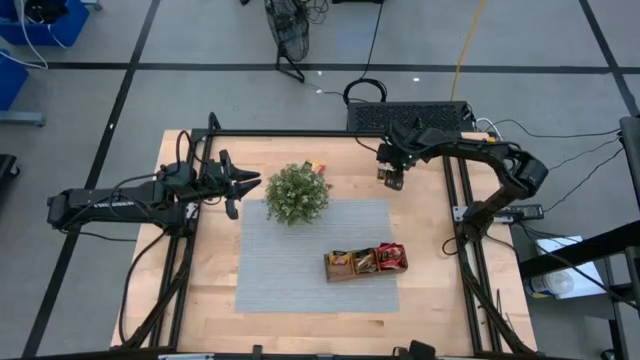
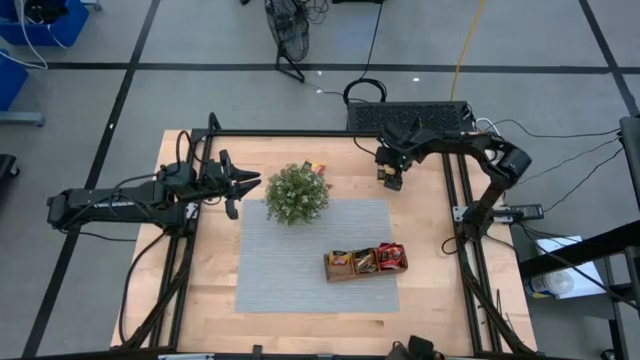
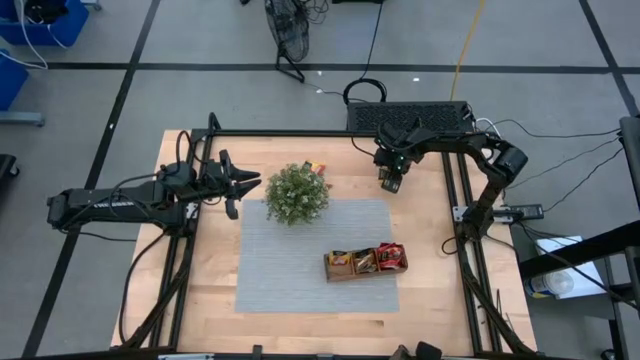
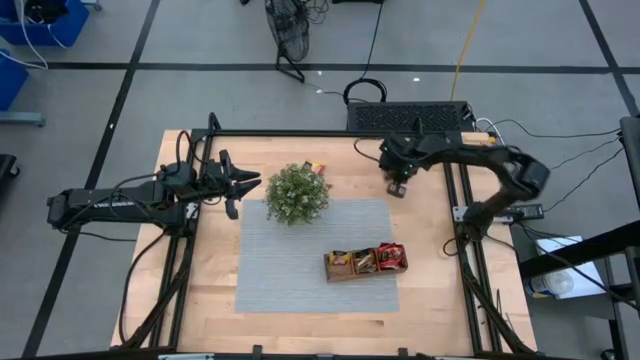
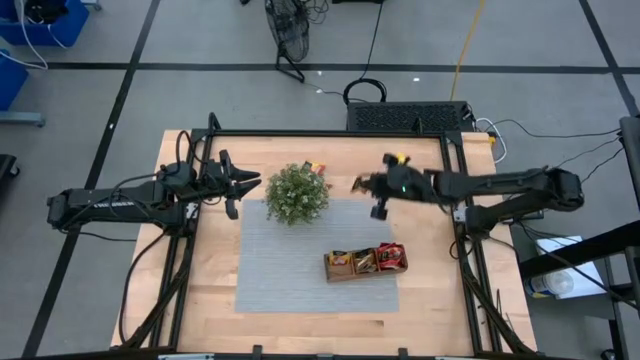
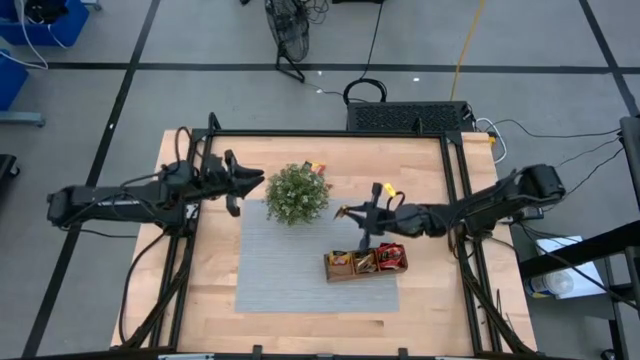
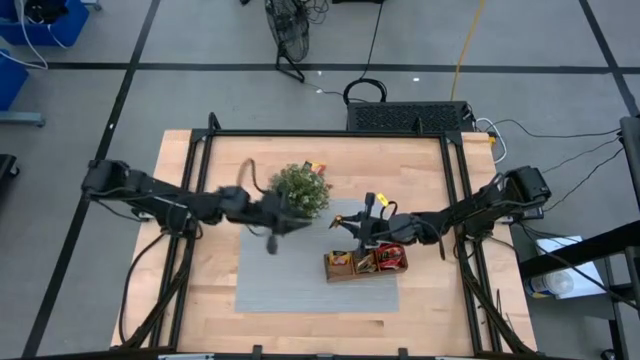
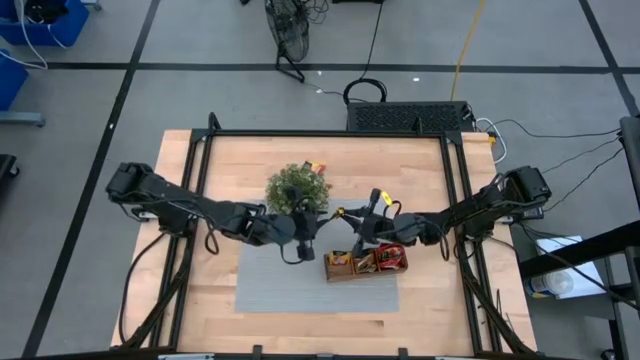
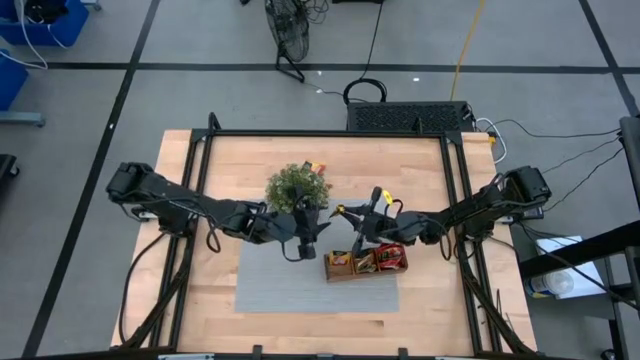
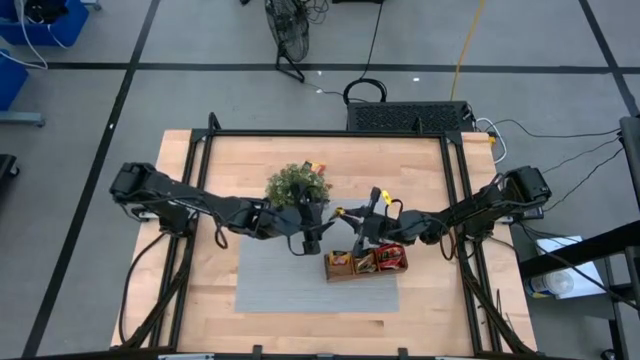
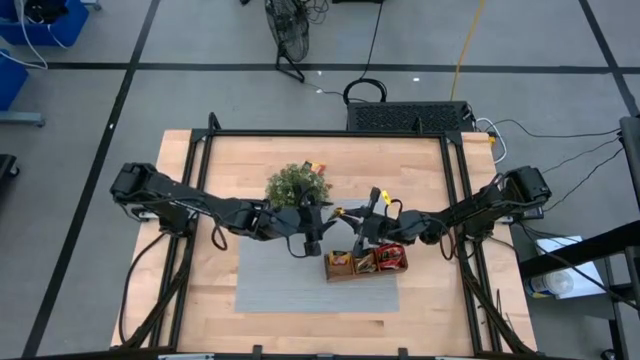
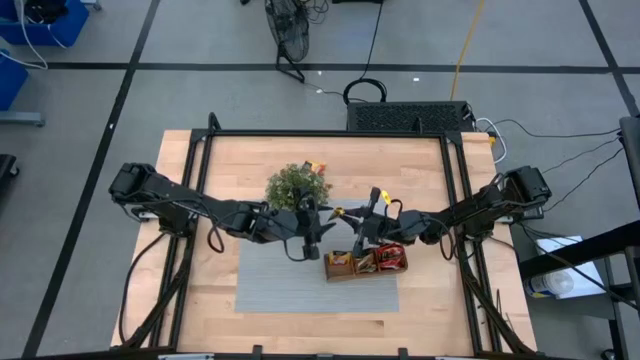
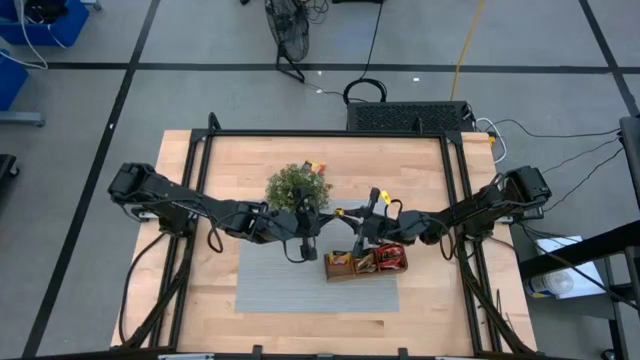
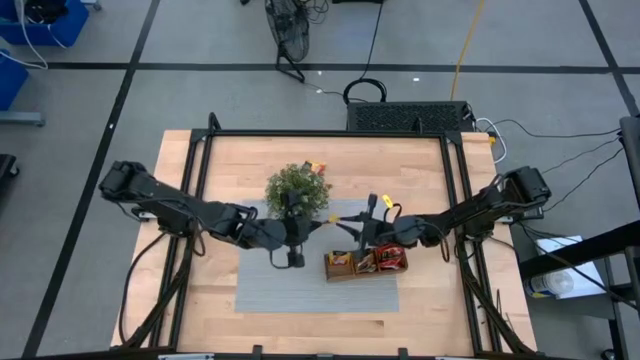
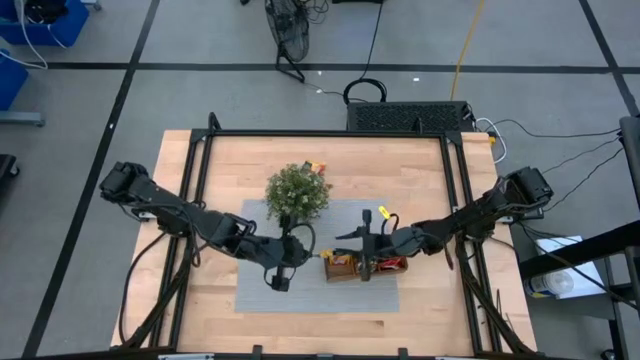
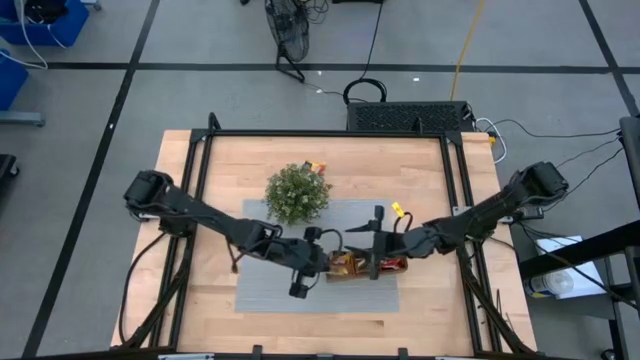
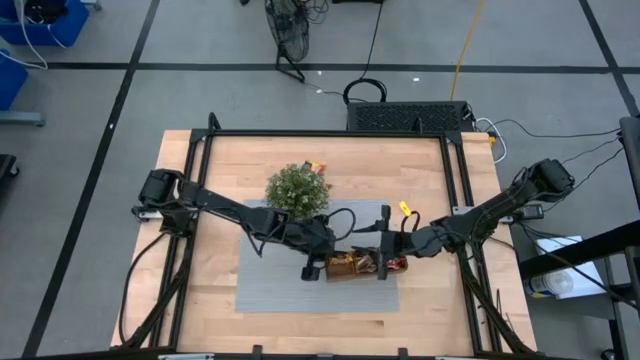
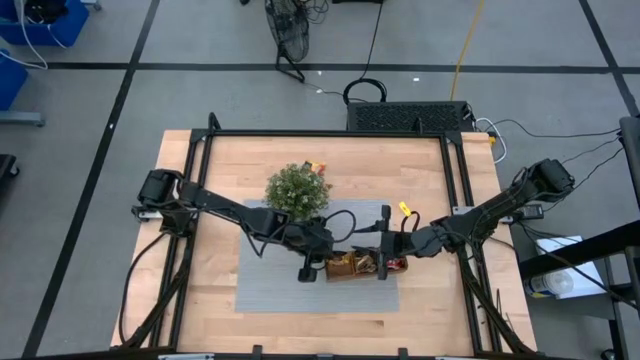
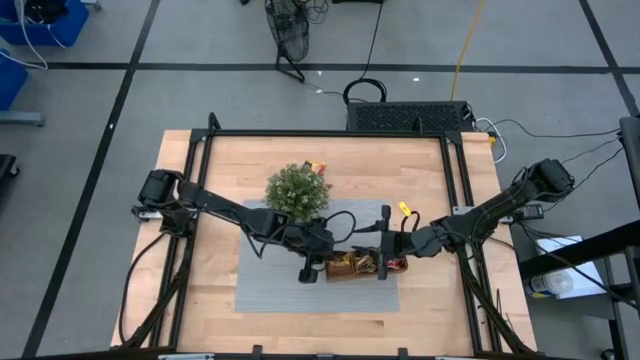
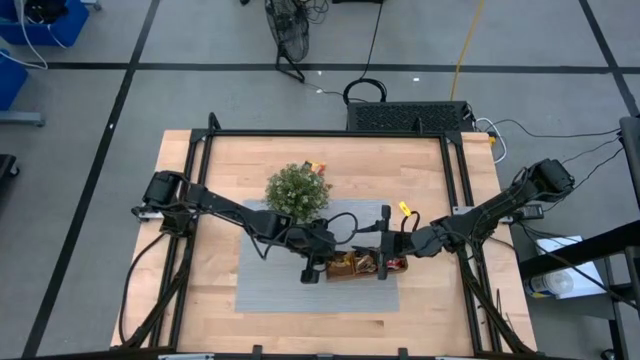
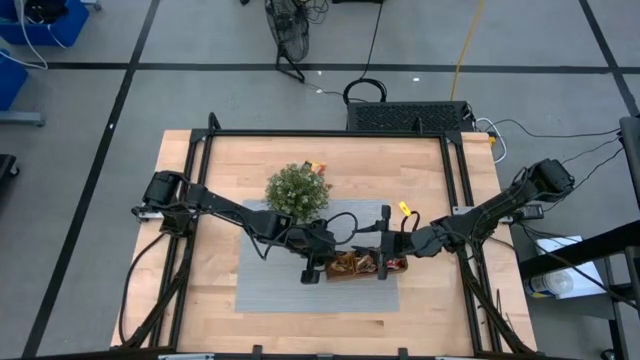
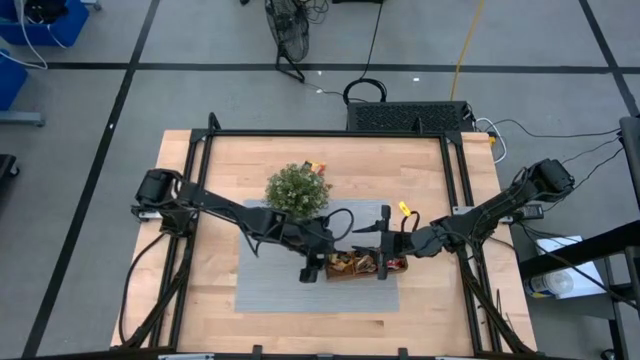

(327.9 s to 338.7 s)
Task: Pick & Place Tea
Put the mango tea sachet into the brown organizer

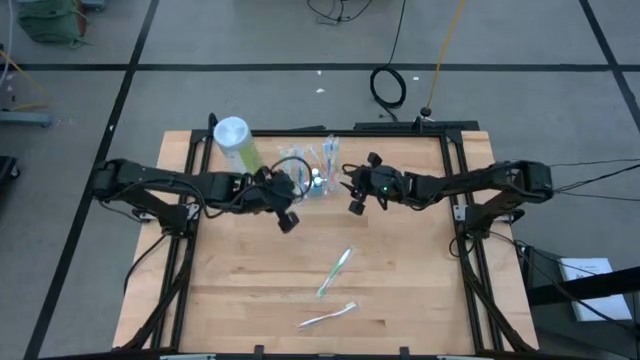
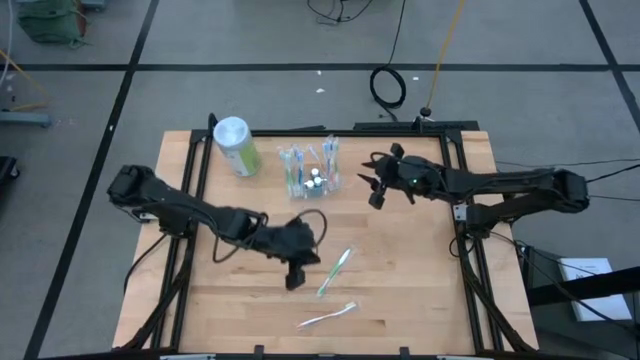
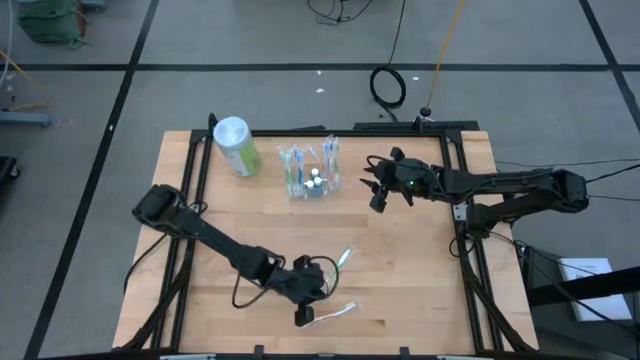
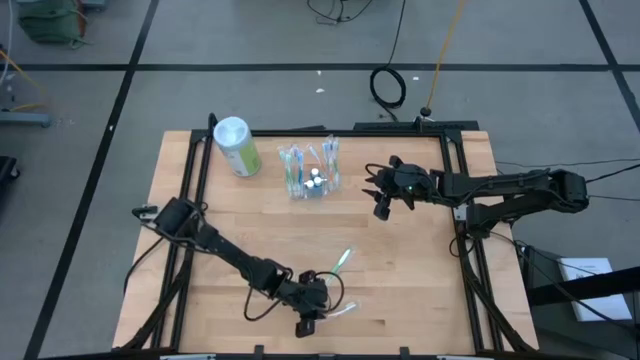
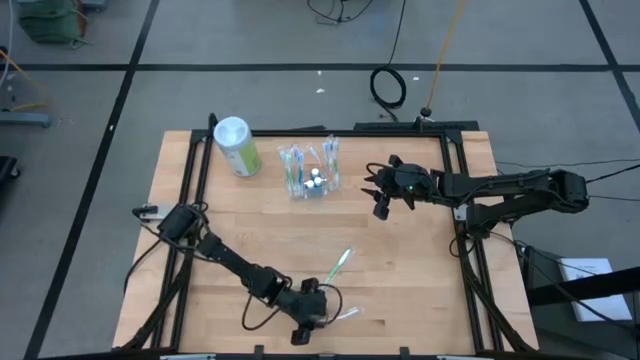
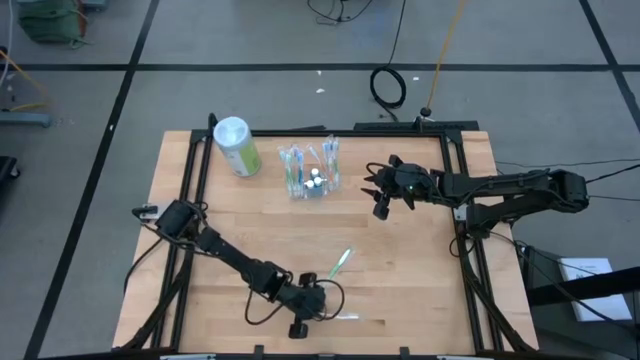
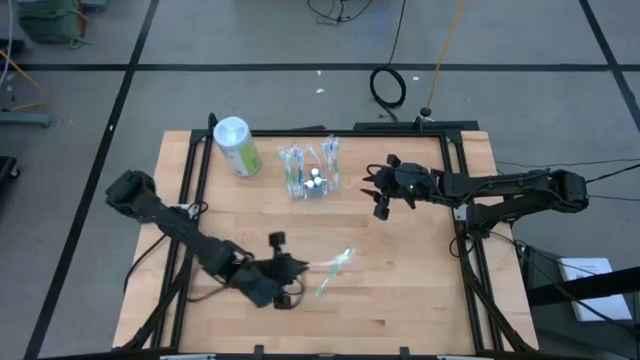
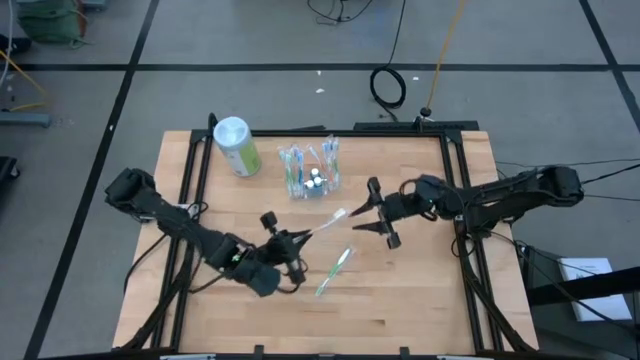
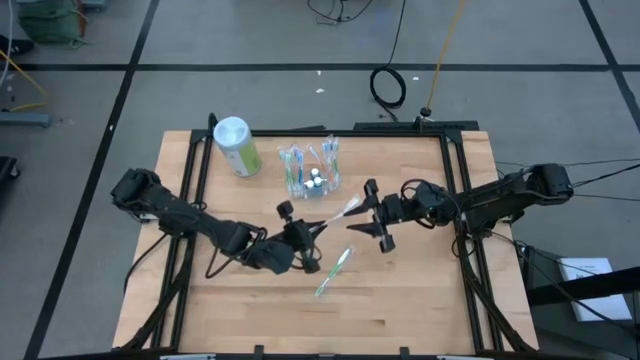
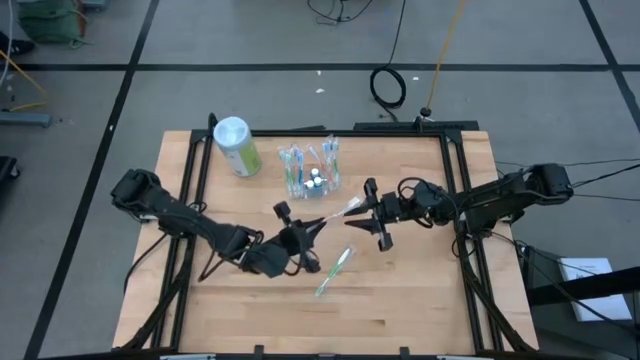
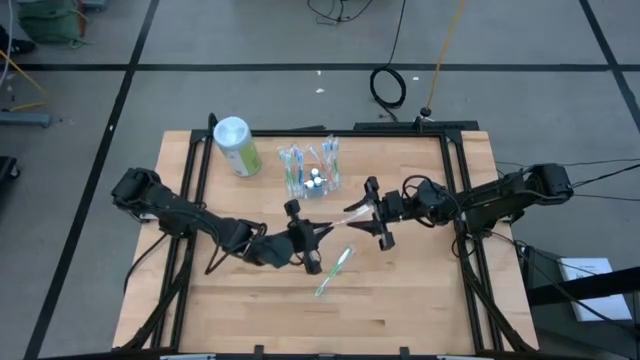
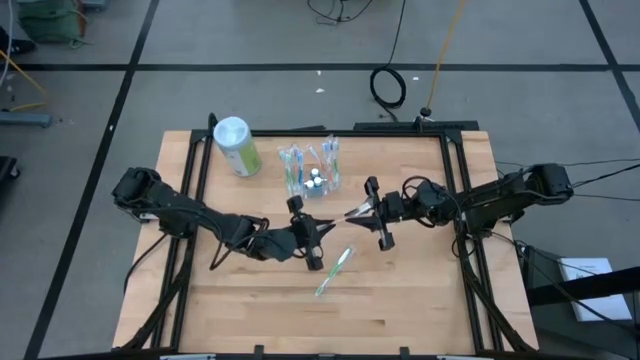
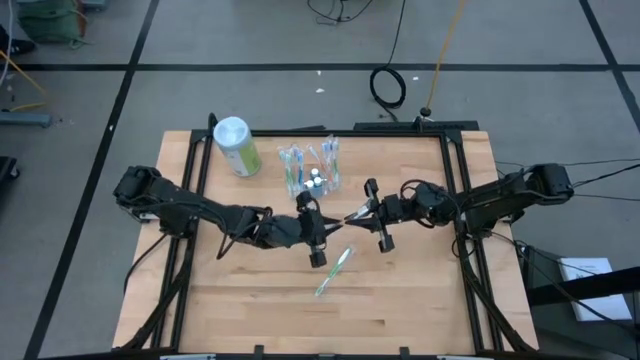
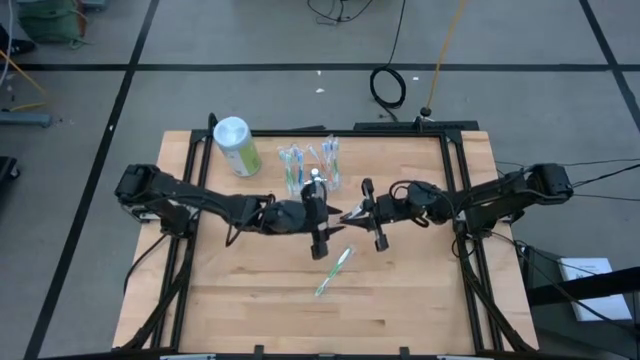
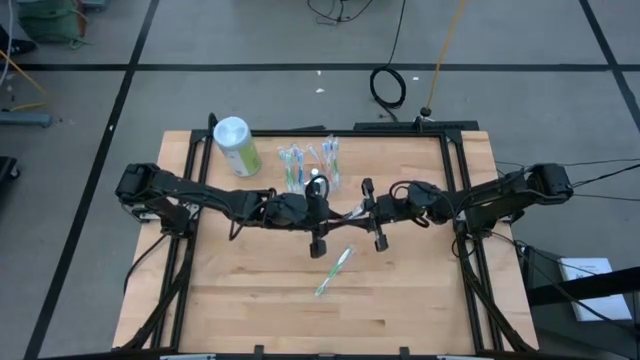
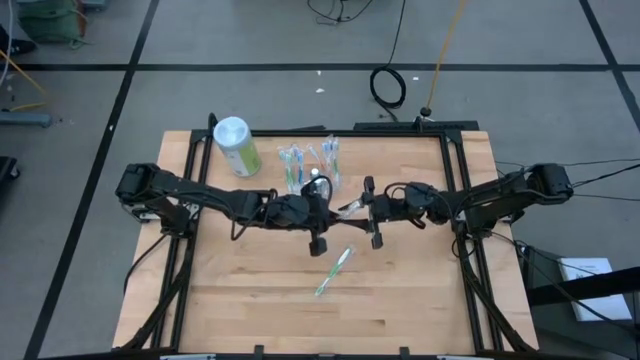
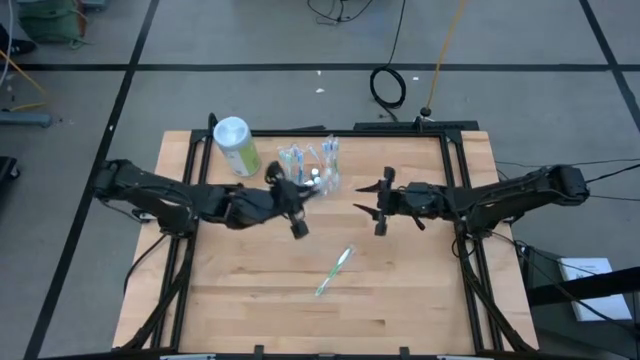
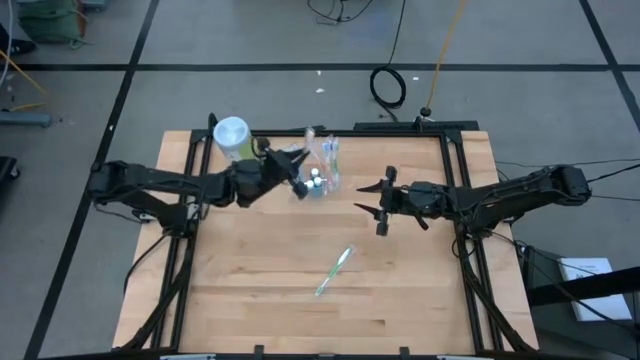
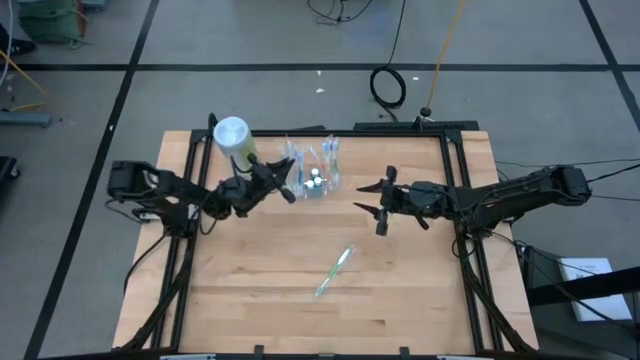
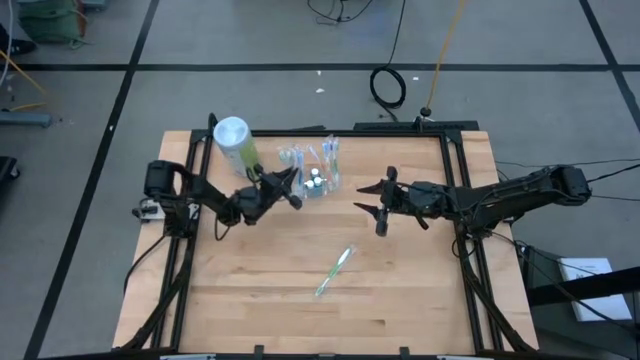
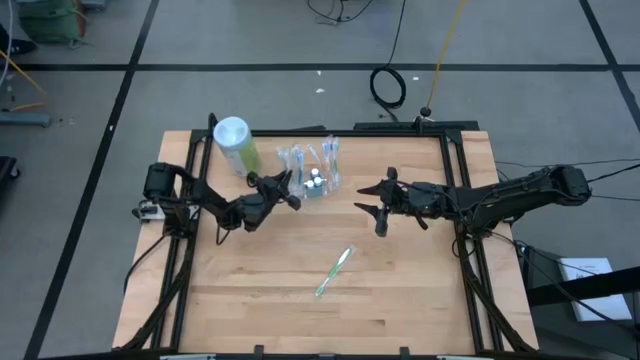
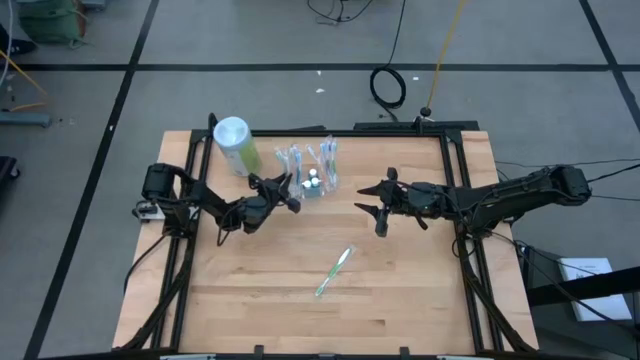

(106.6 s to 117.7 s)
Task: Pick & Place toothbrushing station
Put the orange toothbrush into the transparent organizer
